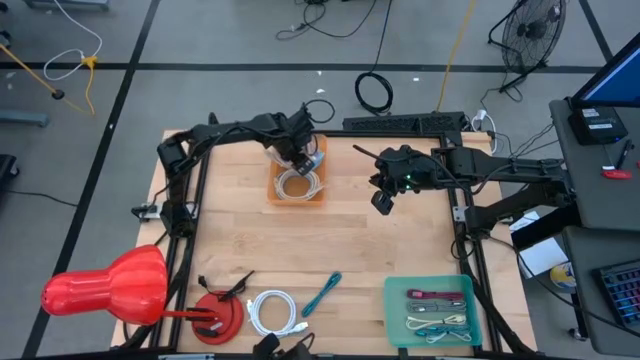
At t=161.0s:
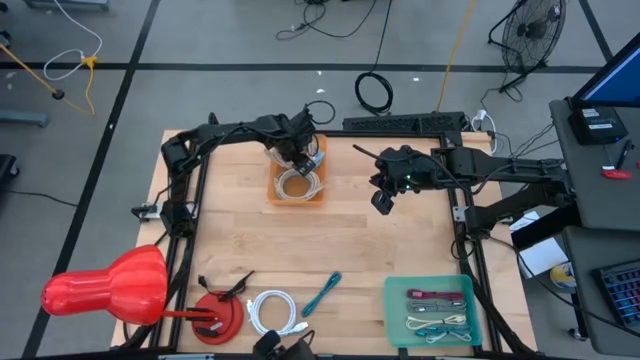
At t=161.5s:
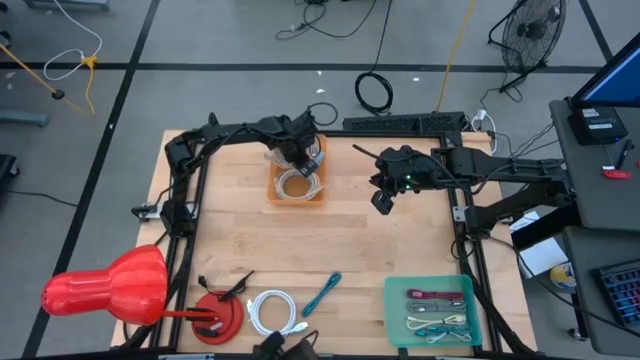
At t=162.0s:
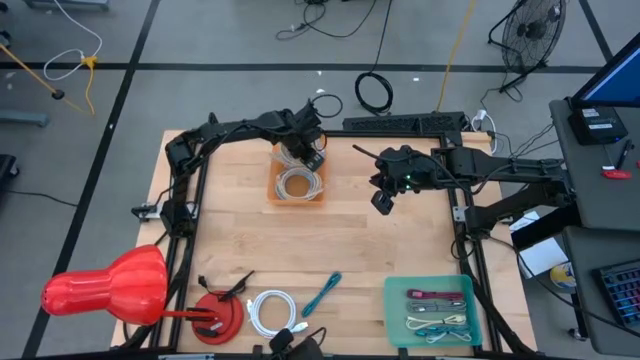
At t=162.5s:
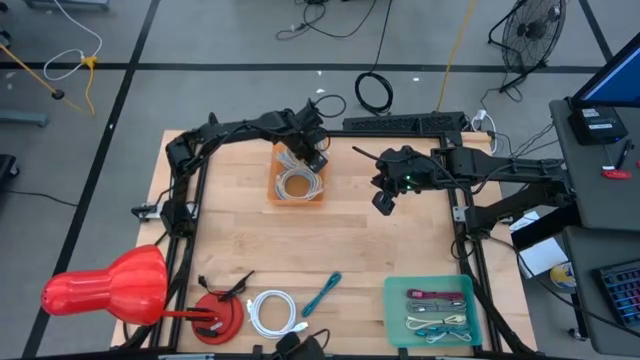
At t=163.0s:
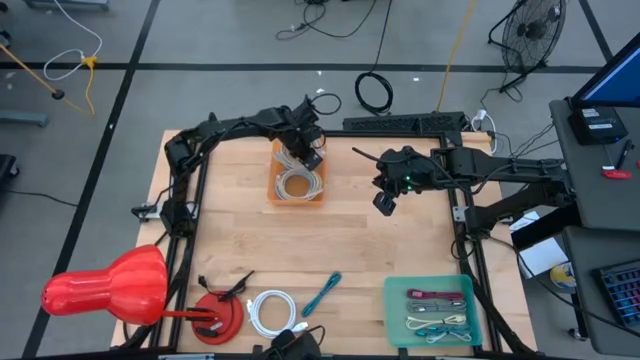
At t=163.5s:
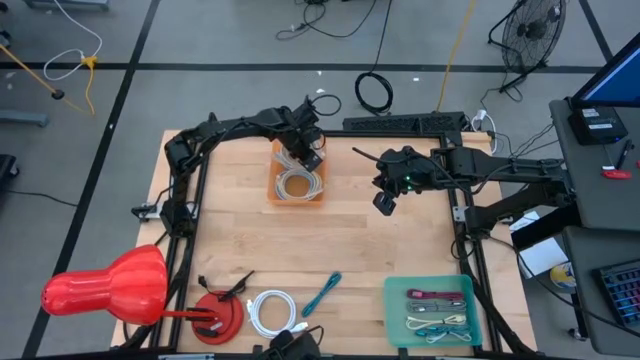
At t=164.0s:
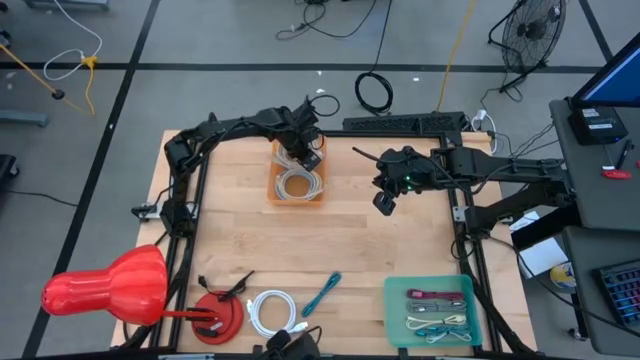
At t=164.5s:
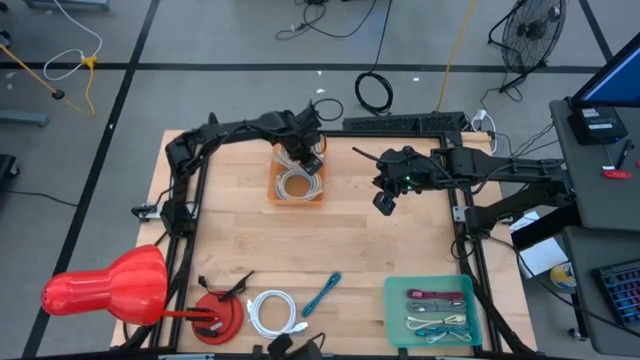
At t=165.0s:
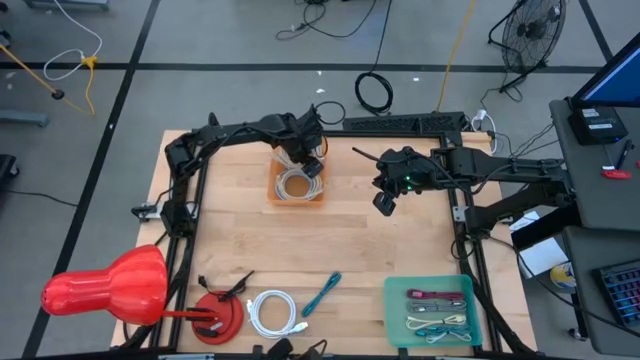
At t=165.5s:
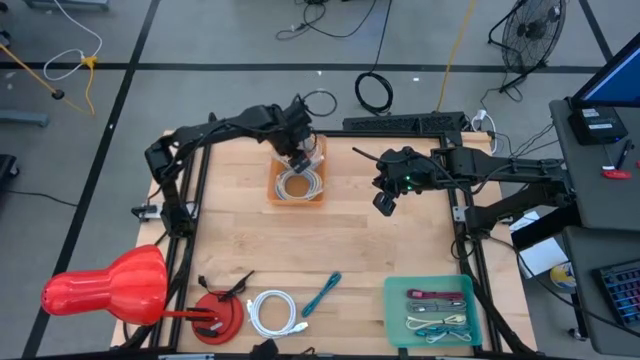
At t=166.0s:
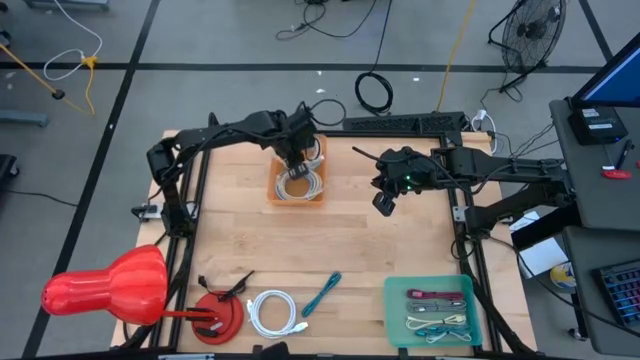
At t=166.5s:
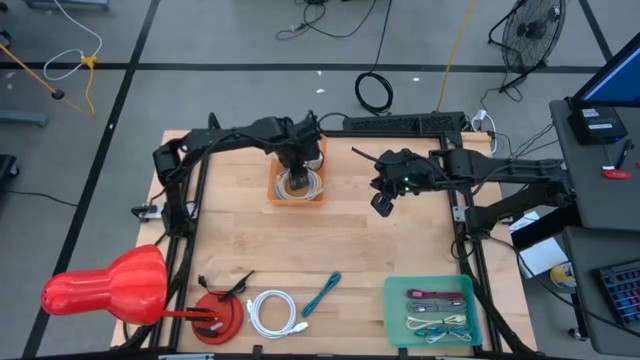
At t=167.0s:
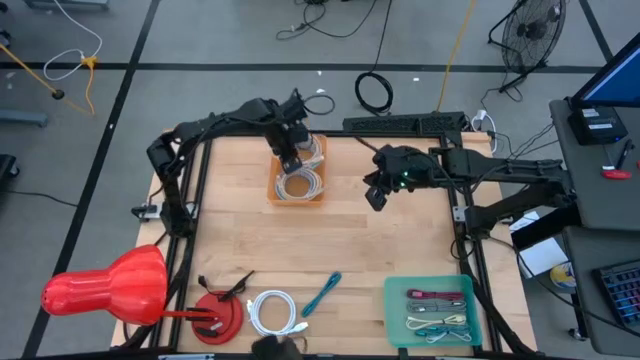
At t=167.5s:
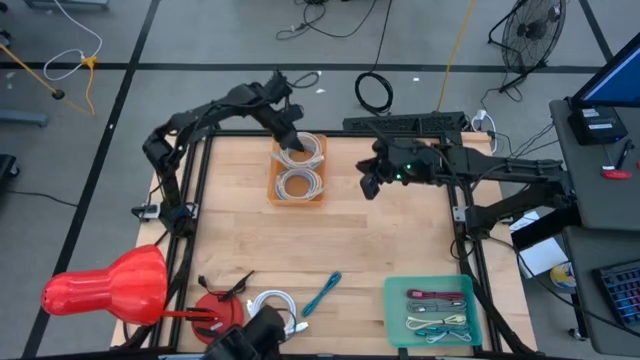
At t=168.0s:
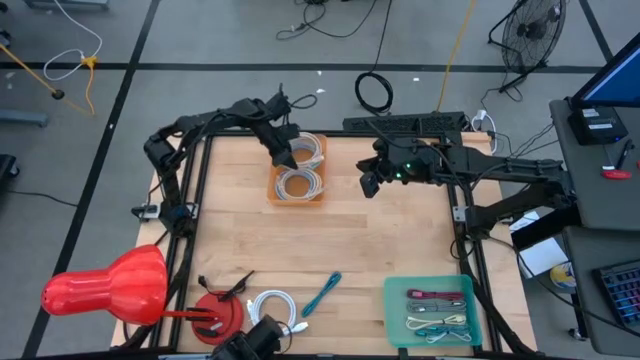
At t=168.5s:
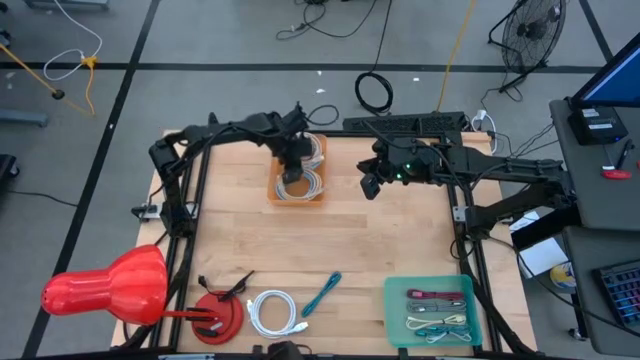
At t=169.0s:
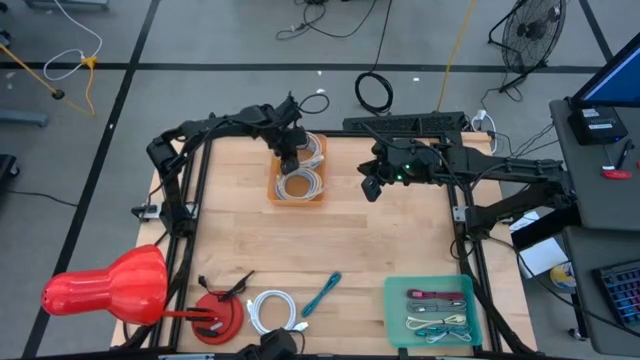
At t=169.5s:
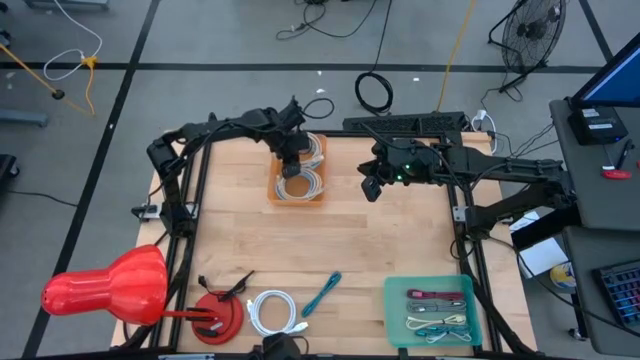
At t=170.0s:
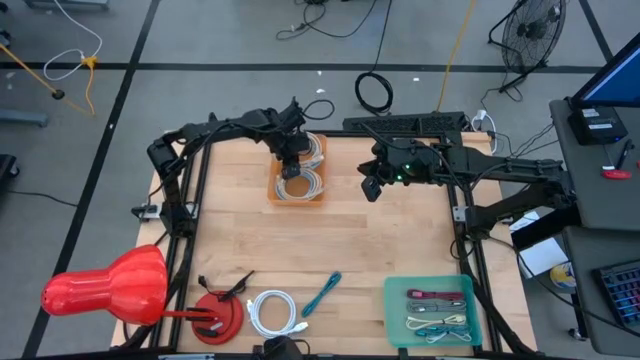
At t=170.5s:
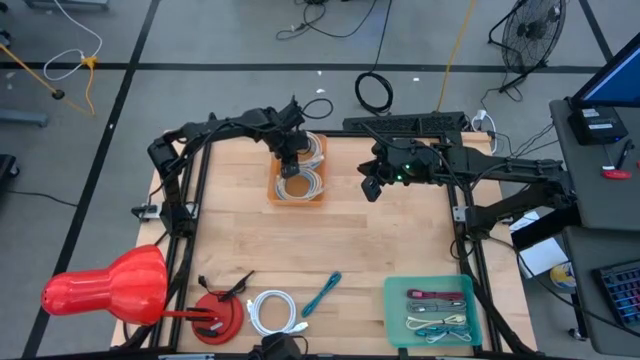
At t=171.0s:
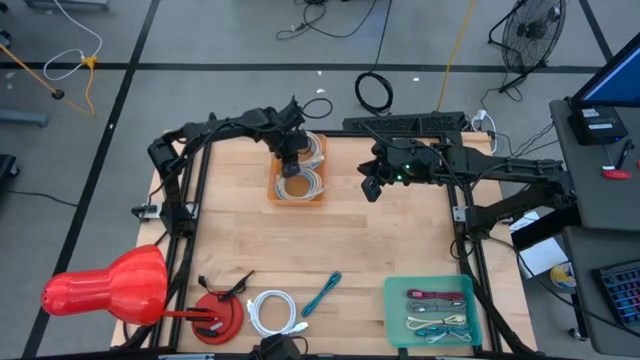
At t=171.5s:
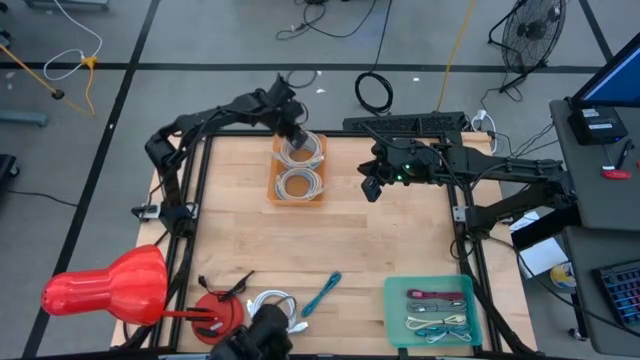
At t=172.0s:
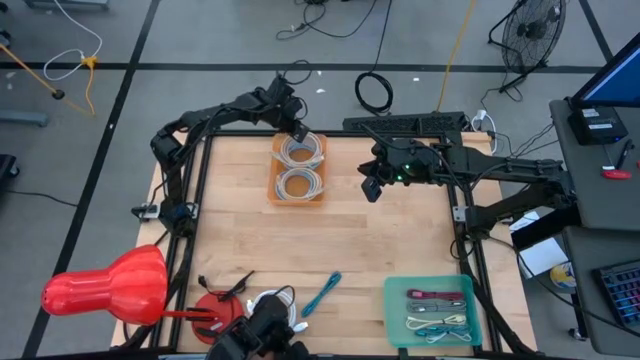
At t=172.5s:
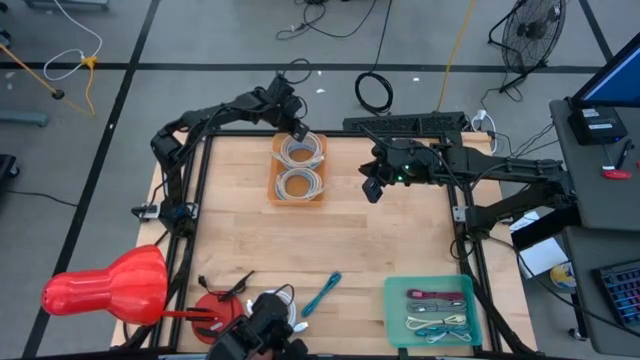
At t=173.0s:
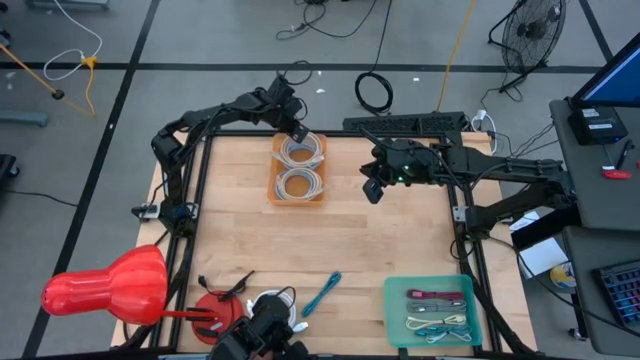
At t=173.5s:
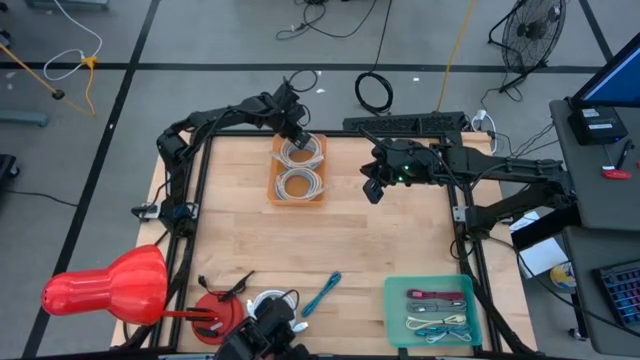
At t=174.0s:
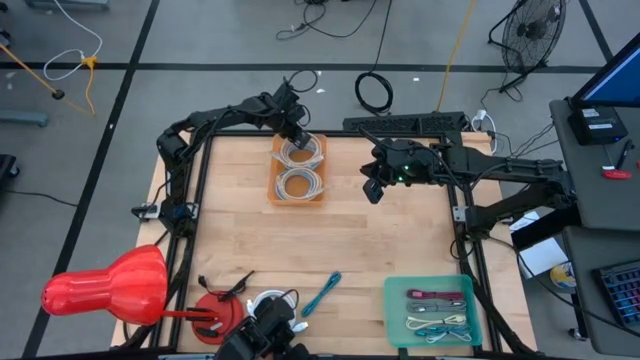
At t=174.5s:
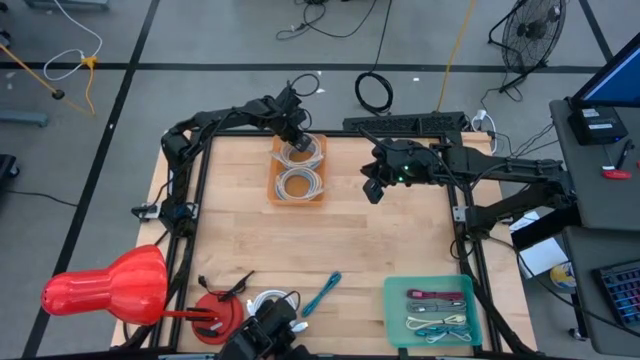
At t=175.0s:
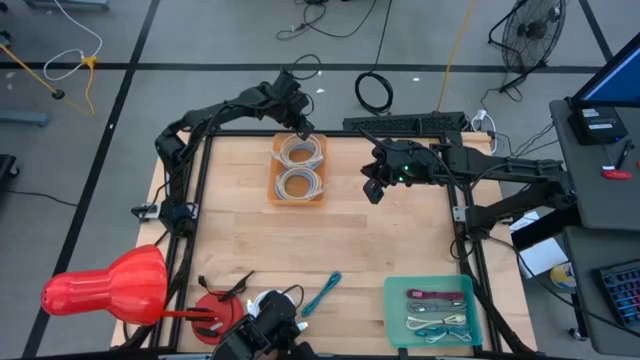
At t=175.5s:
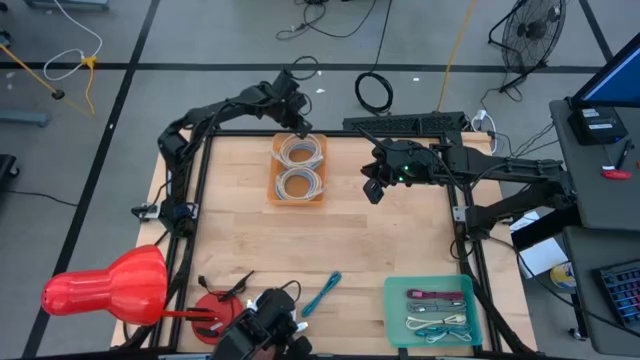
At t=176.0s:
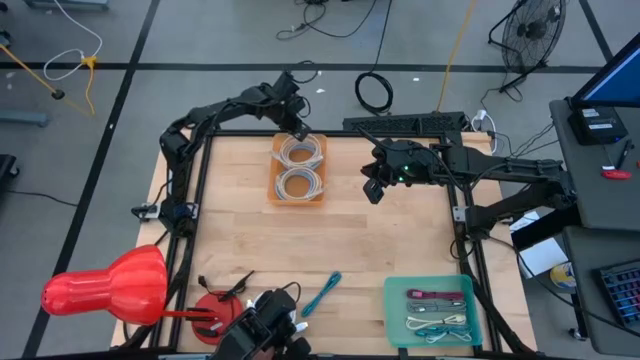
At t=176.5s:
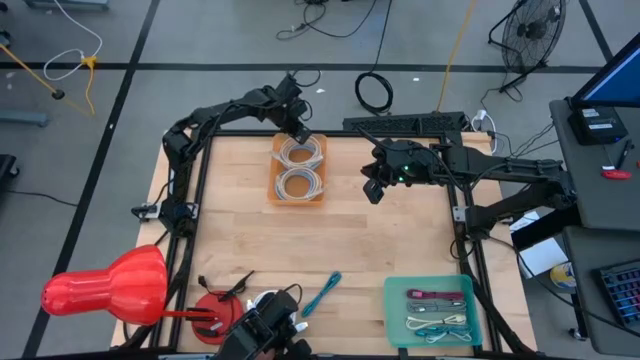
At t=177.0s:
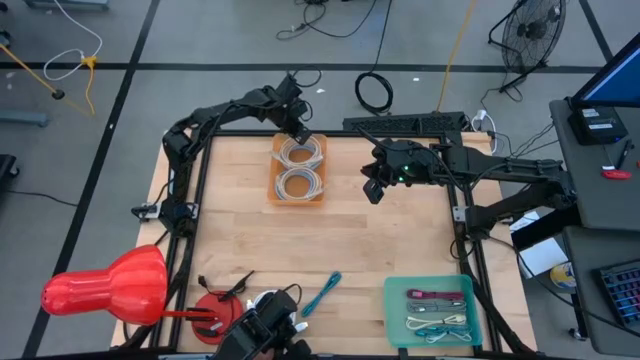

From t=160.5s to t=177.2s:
Task: Pick & Place USB Port
Put the brown usb cable into the orange bin
